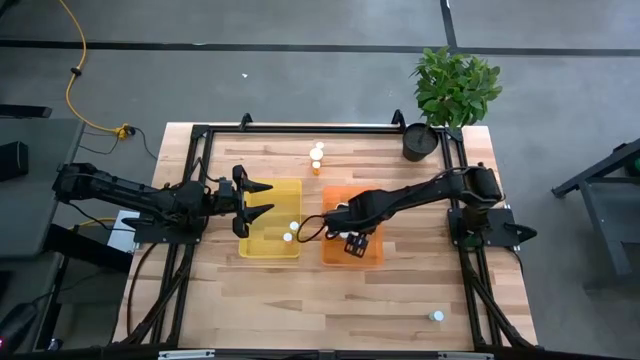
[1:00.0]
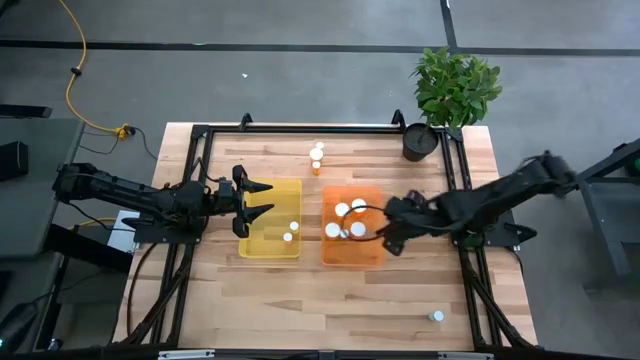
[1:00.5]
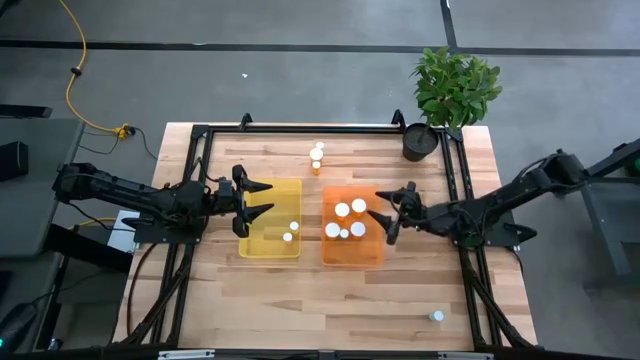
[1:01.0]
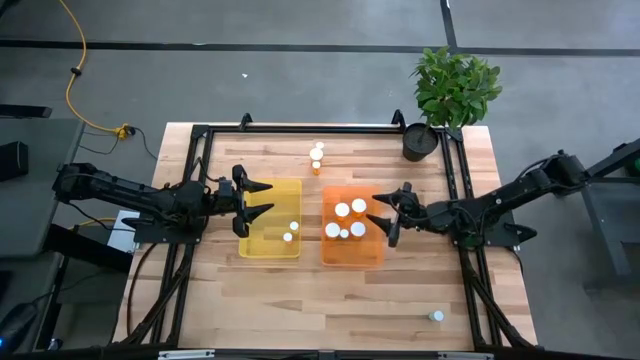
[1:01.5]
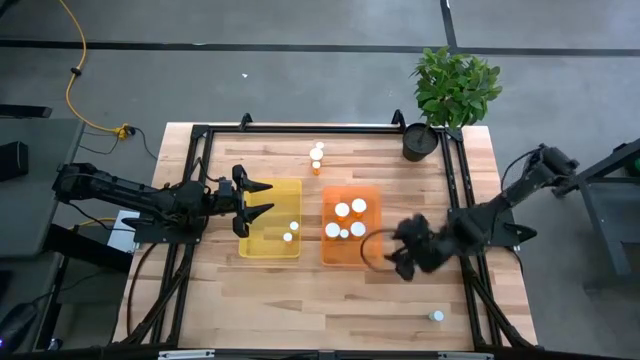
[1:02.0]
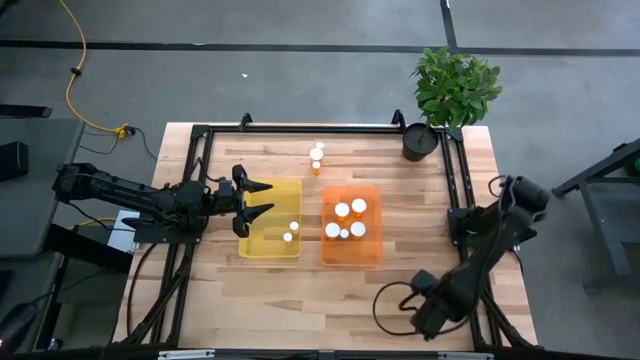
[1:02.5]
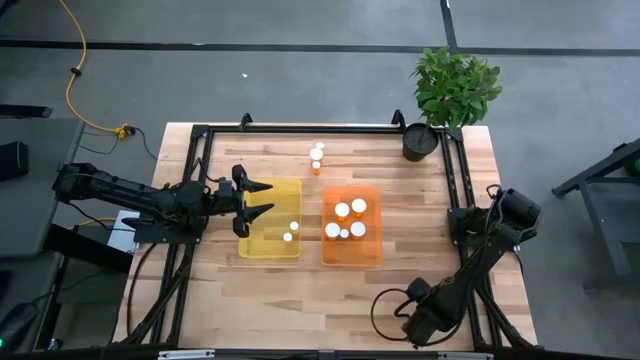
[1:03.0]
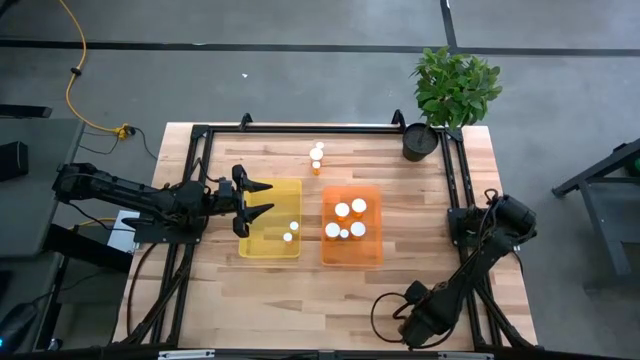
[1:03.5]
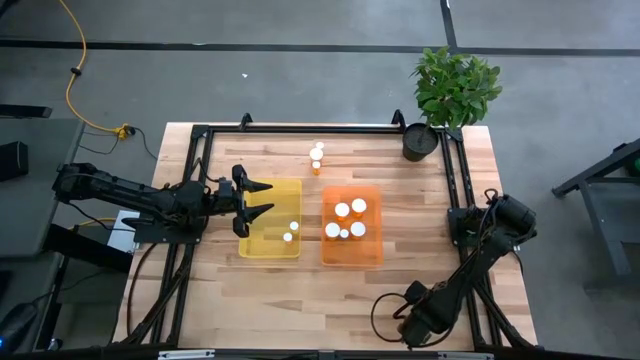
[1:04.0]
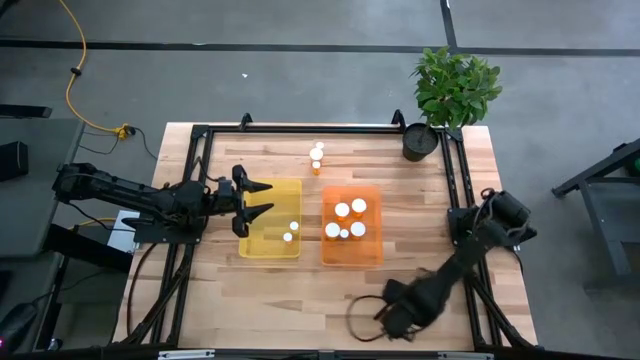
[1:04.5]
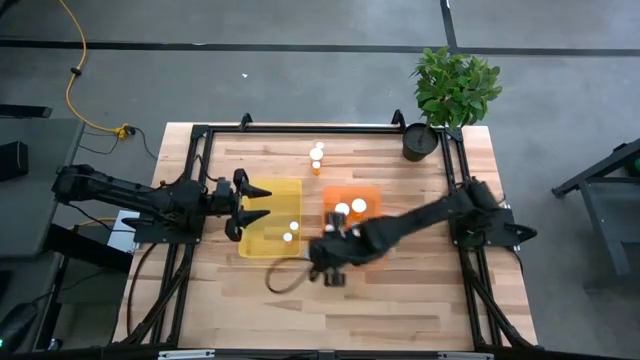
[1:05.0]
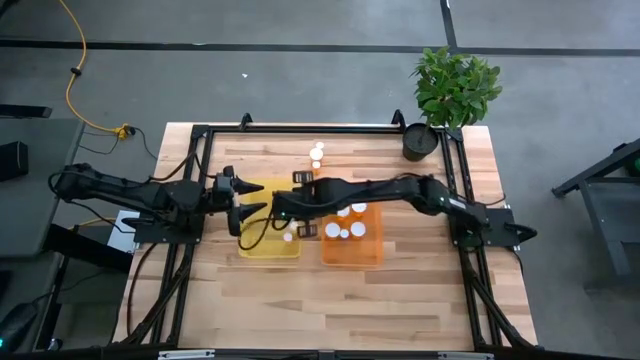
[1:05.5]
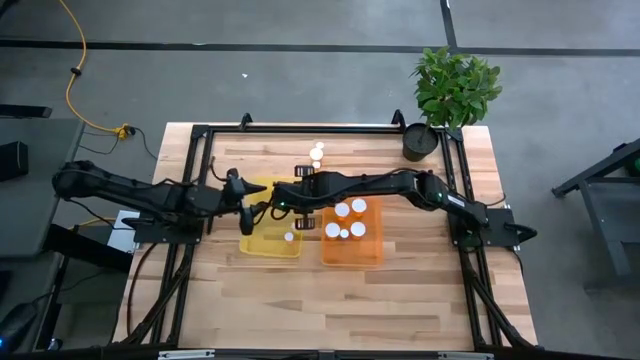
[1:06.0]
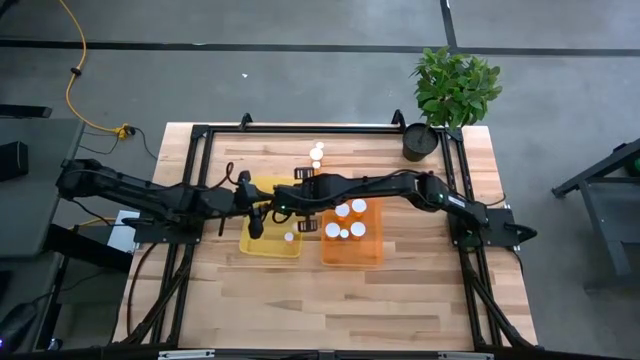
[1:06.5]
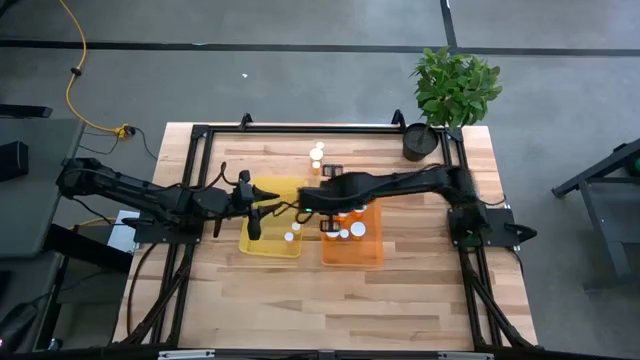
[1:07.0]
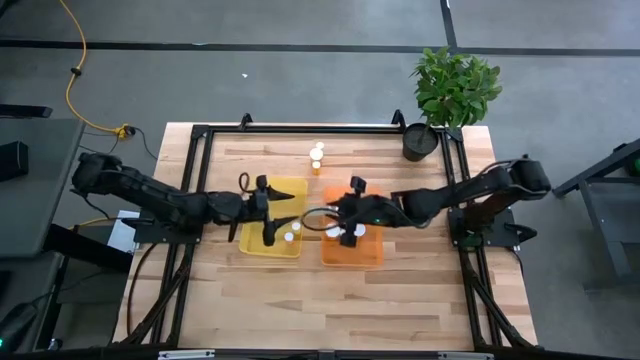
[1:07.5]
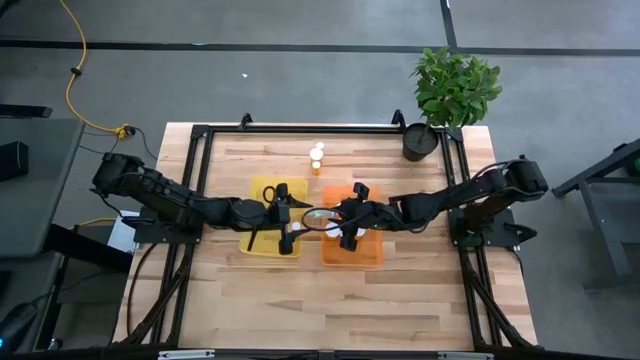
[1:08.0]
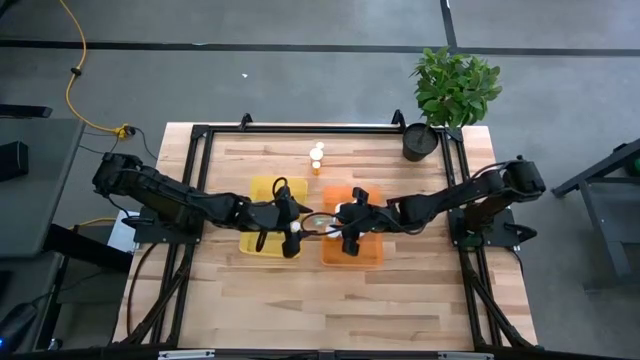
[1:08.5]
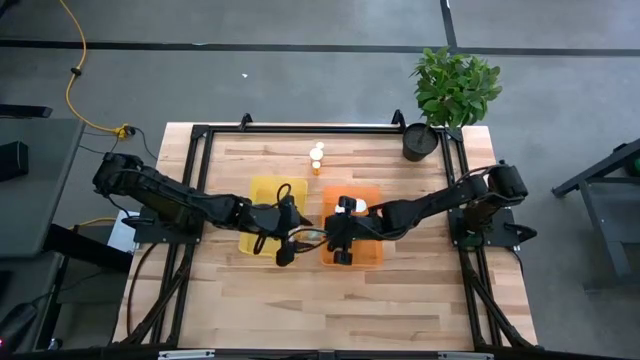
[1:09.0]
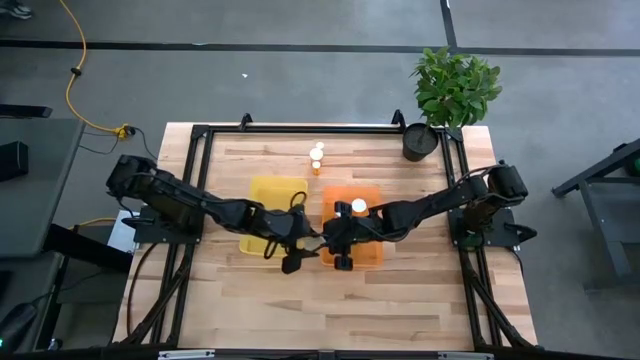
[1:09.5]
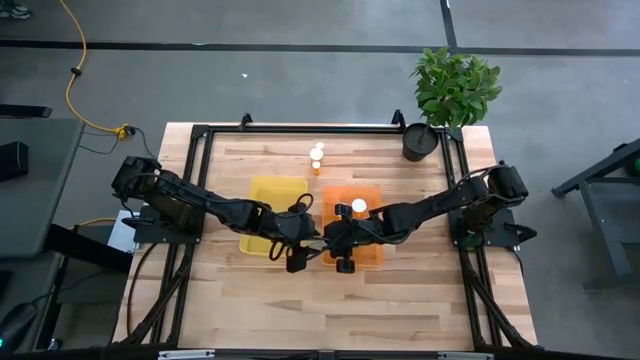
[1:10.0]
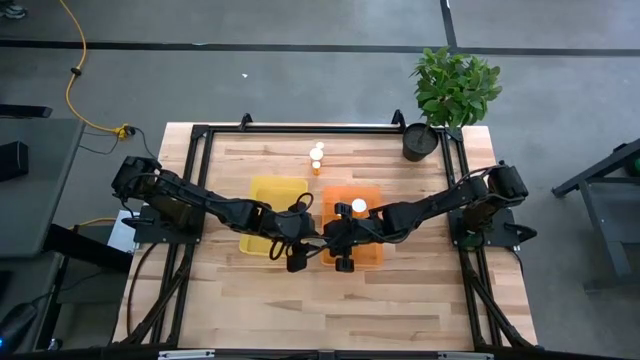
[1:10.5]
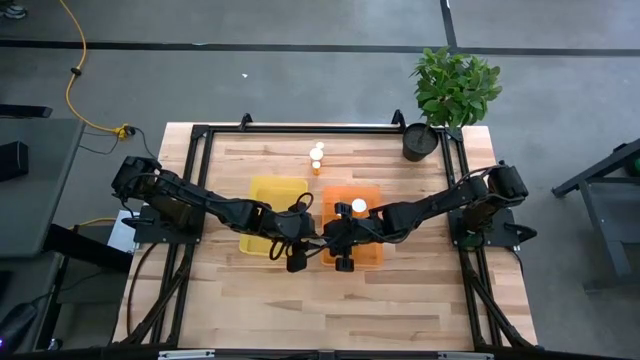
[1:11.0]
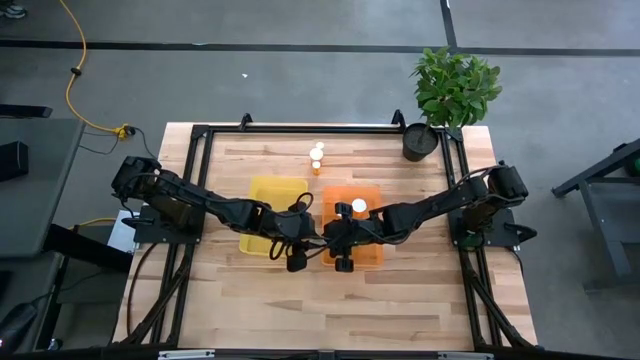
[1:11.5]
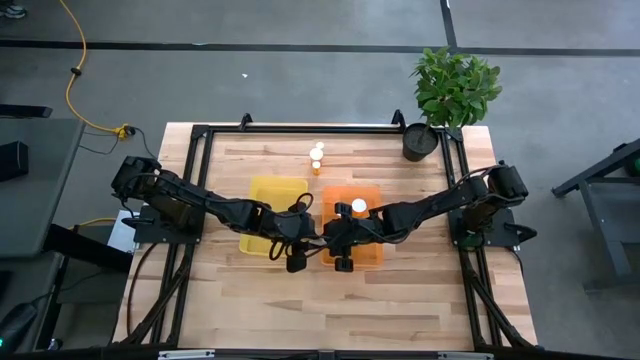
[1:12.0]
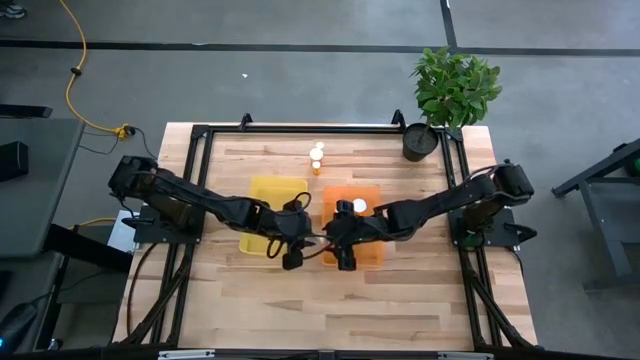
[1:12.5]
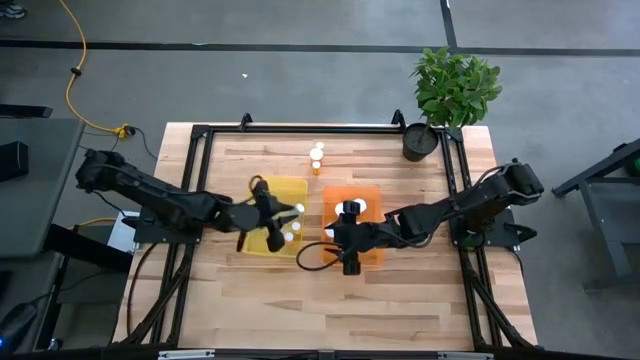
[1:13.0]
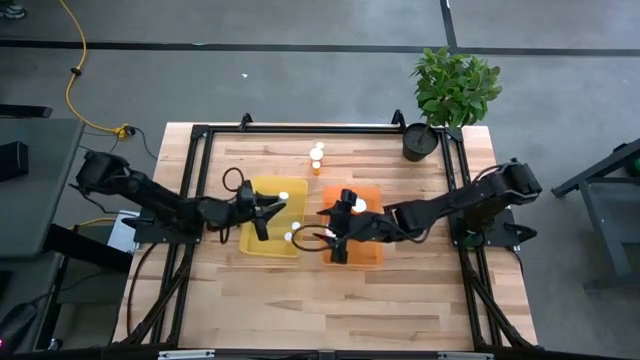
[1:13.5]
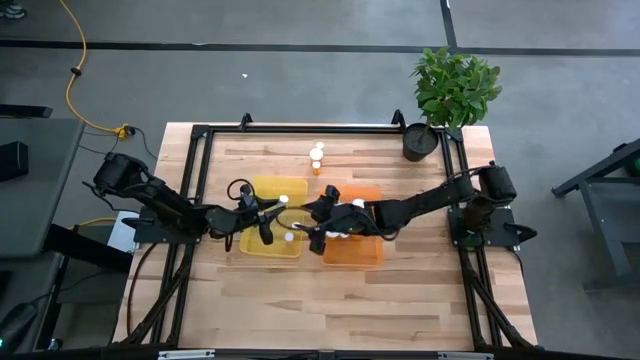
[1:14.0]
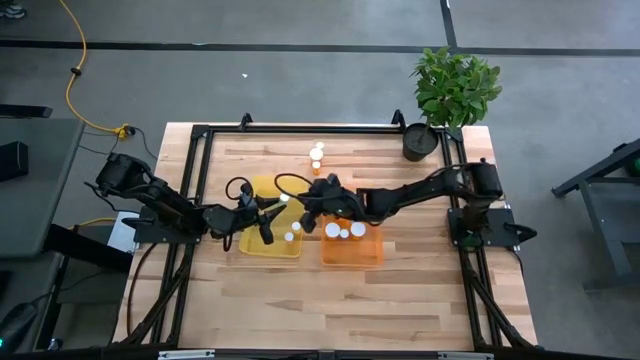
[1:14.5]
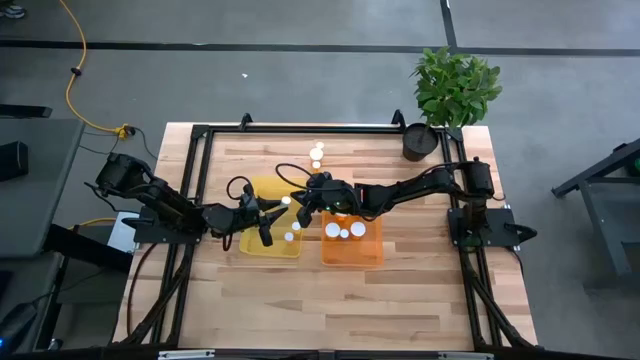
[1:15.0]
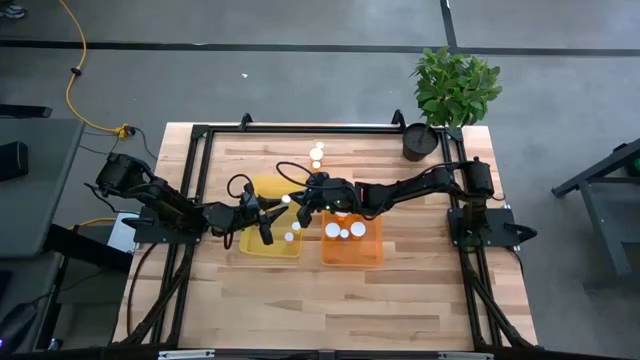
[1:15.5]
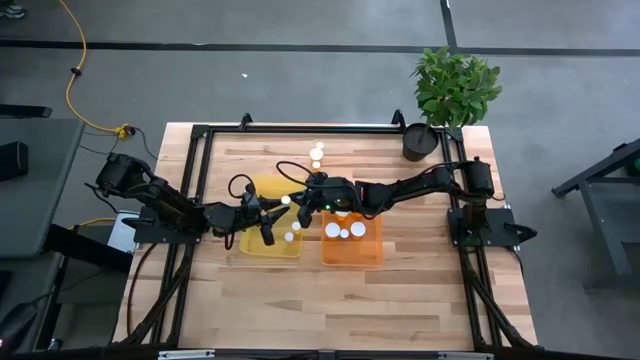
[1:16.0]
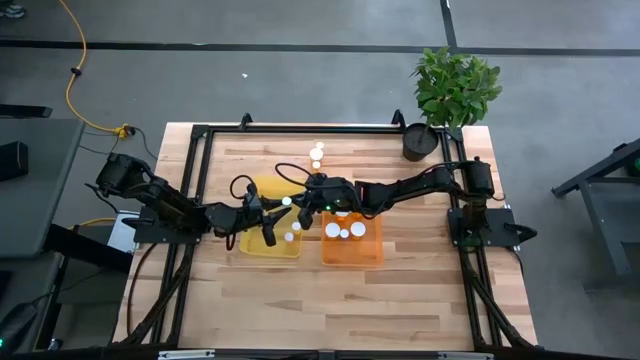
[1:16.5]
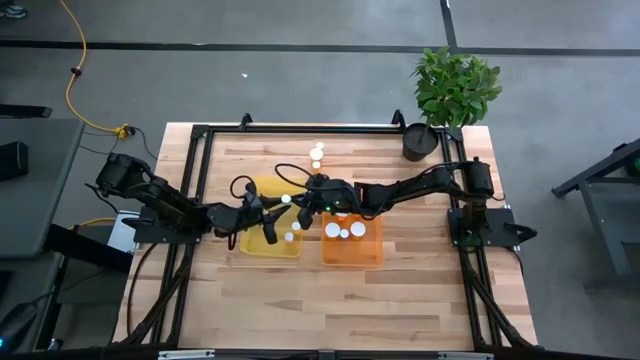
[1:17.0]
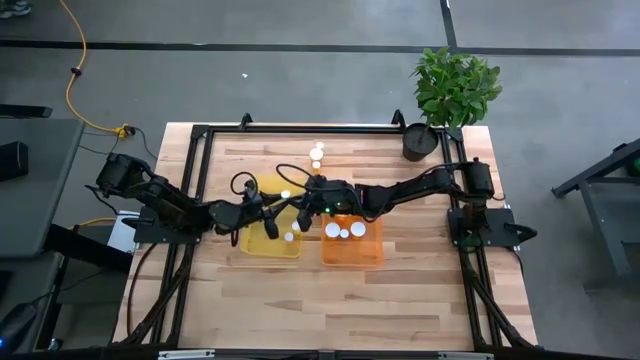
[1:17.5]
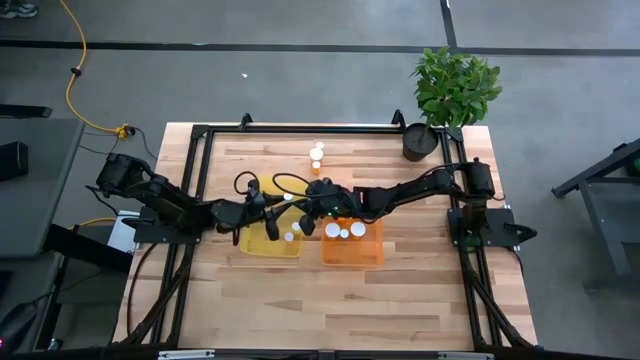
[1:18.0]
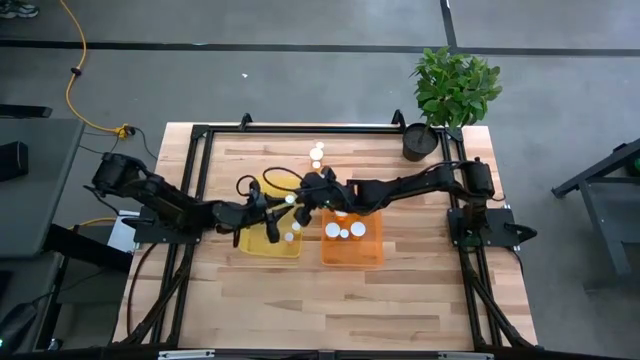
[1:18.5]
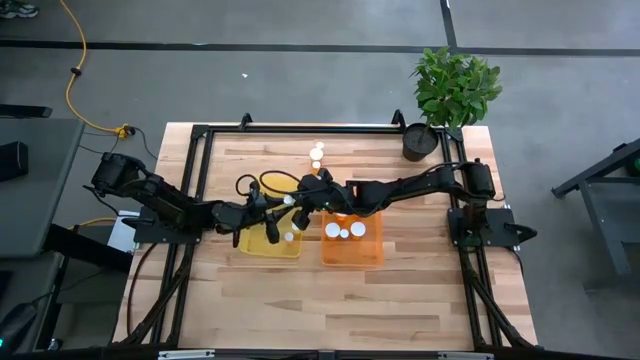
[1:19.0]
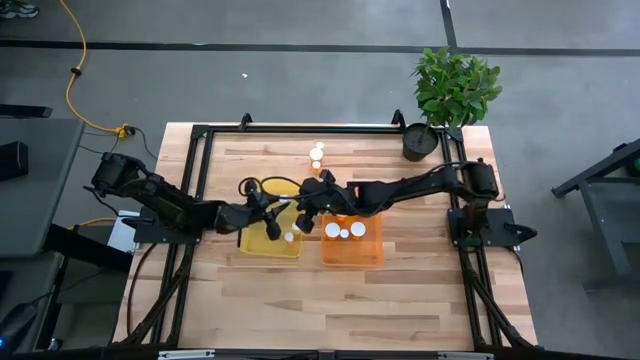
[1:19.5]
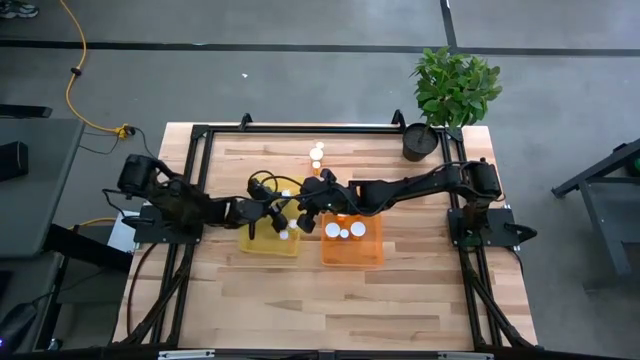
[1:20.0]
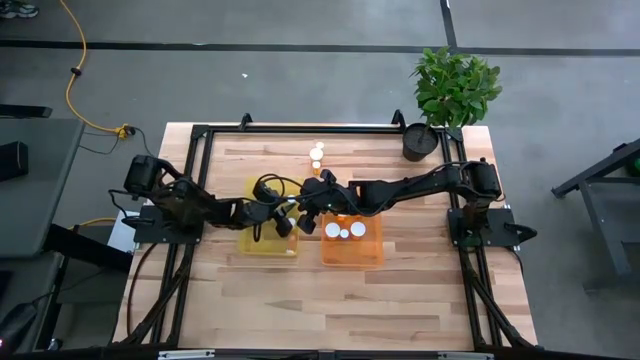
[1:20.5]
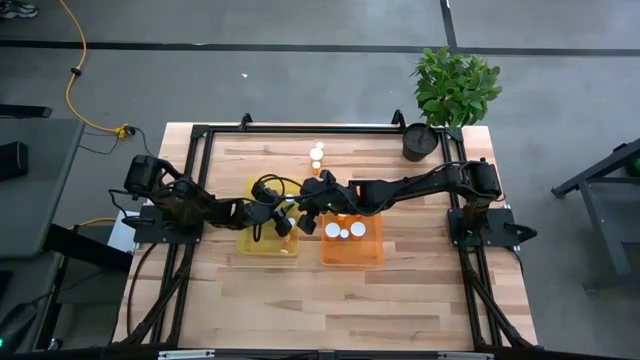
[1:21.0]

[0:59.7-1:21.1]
Task: Pick and place medicine bottles into bin by pill shape (circle, oval)
Put the blue bottle pill into the yellow bin
